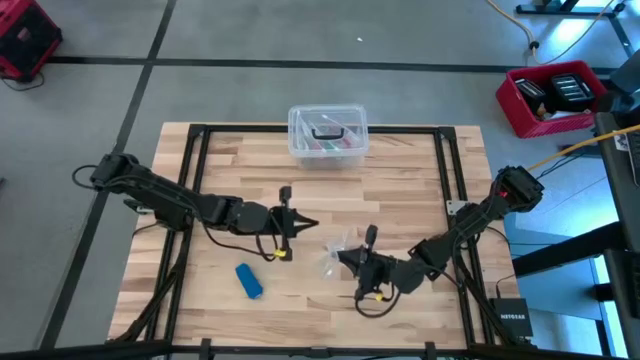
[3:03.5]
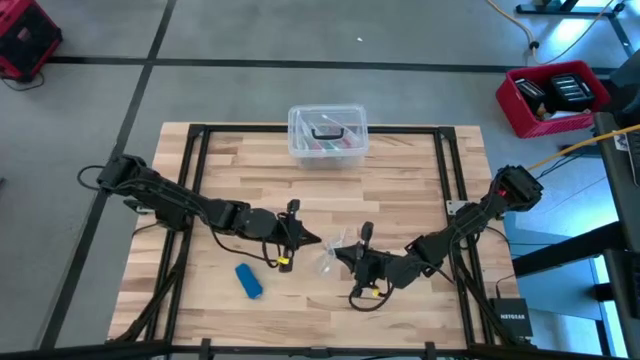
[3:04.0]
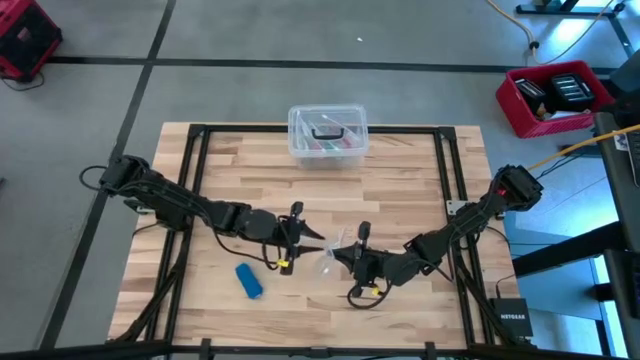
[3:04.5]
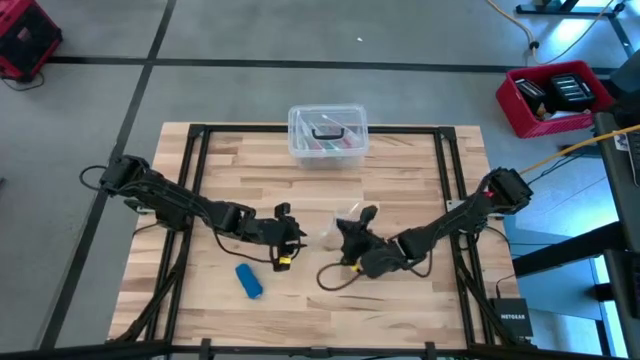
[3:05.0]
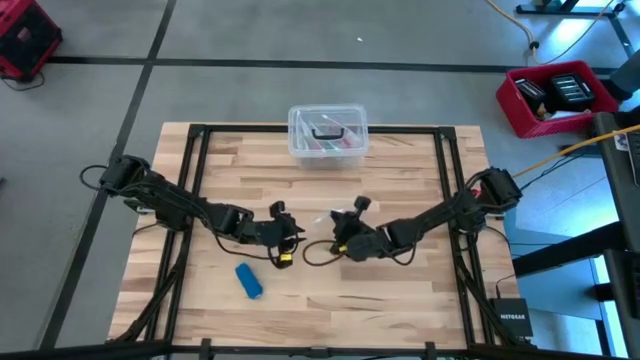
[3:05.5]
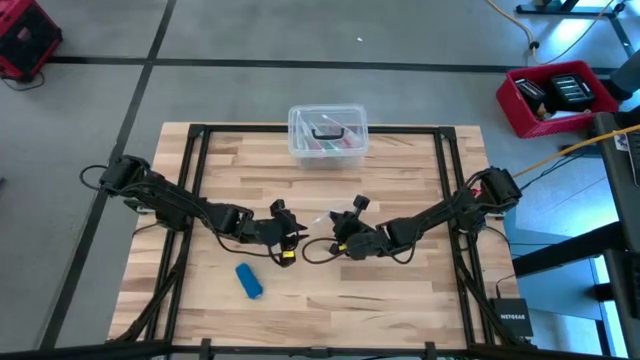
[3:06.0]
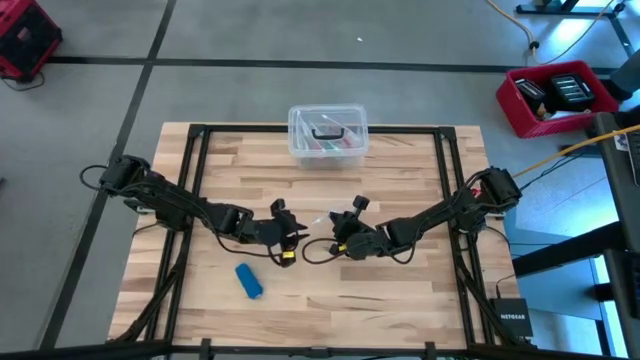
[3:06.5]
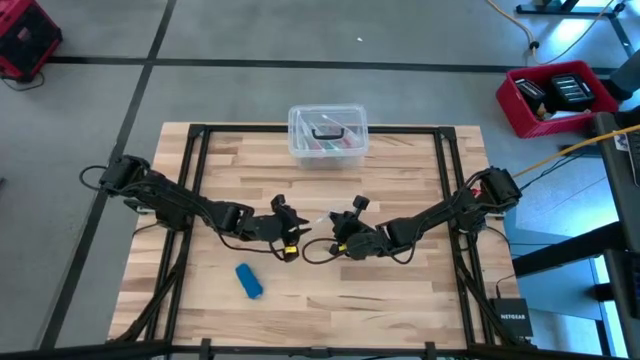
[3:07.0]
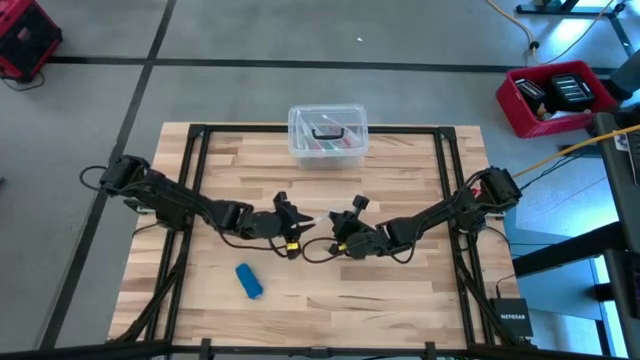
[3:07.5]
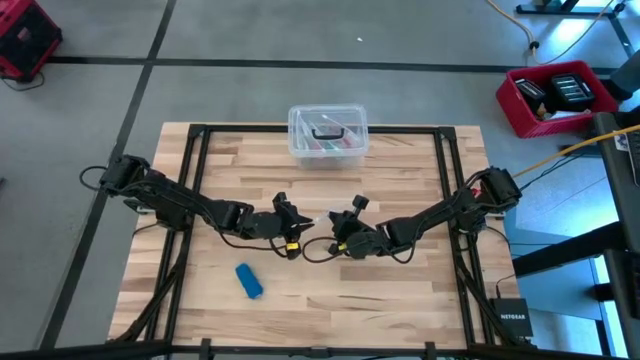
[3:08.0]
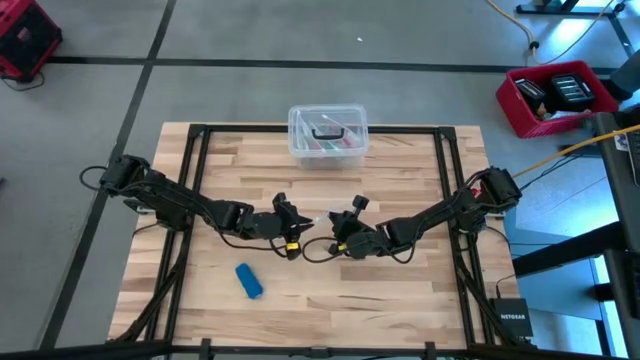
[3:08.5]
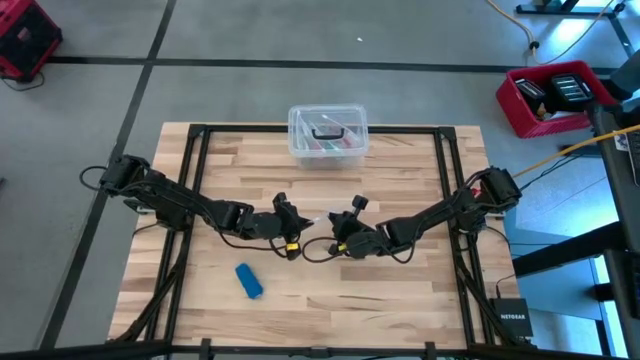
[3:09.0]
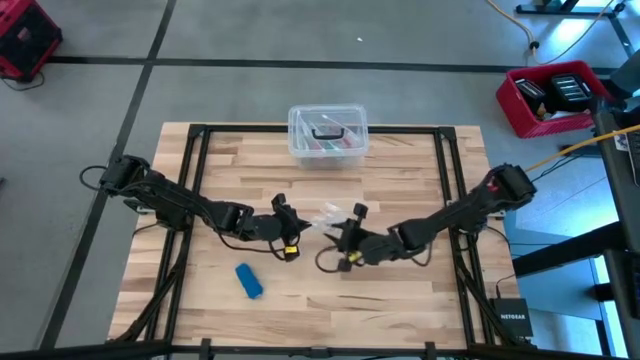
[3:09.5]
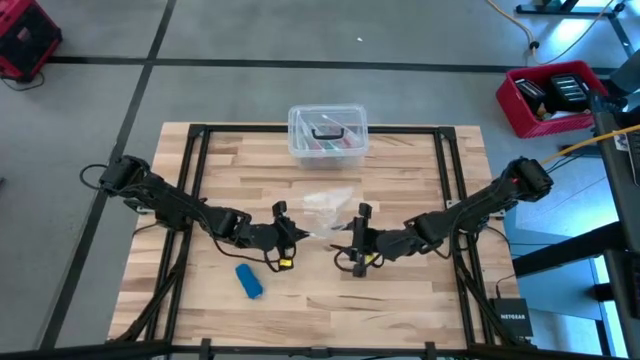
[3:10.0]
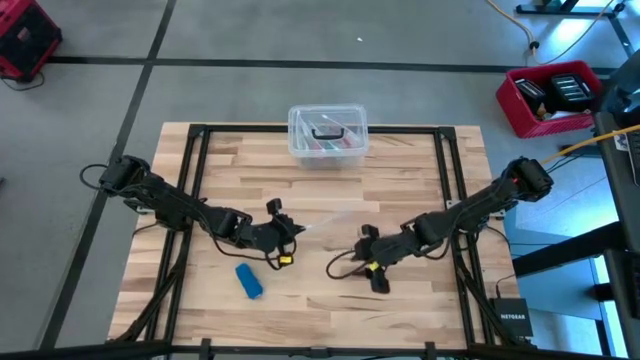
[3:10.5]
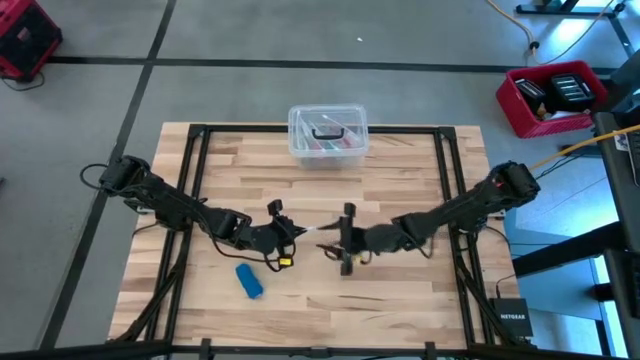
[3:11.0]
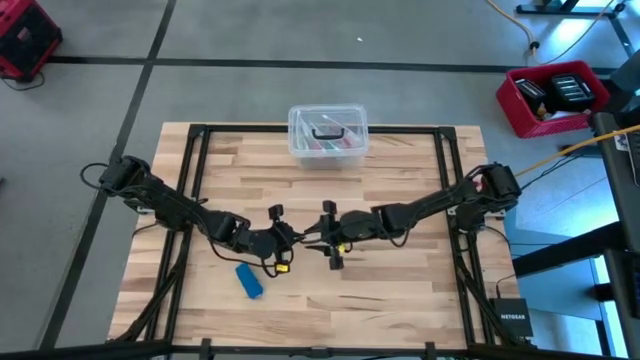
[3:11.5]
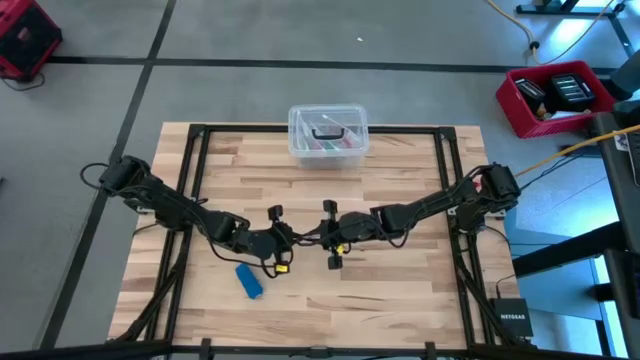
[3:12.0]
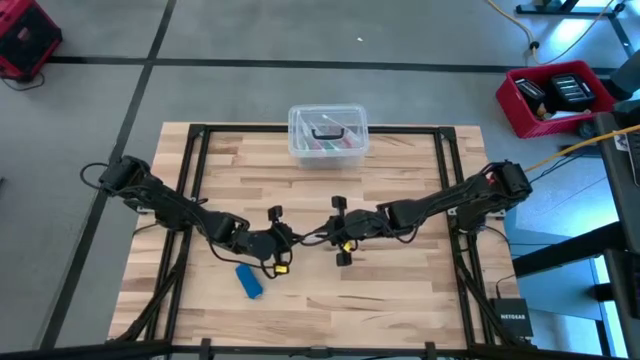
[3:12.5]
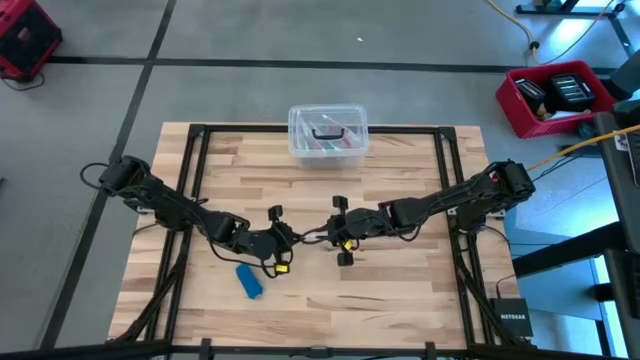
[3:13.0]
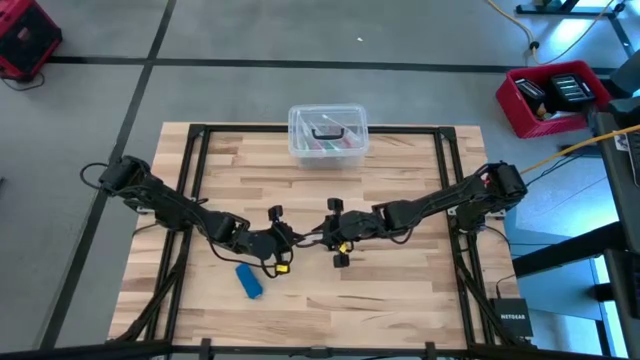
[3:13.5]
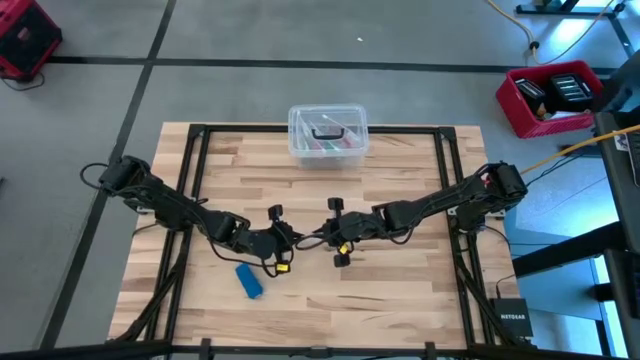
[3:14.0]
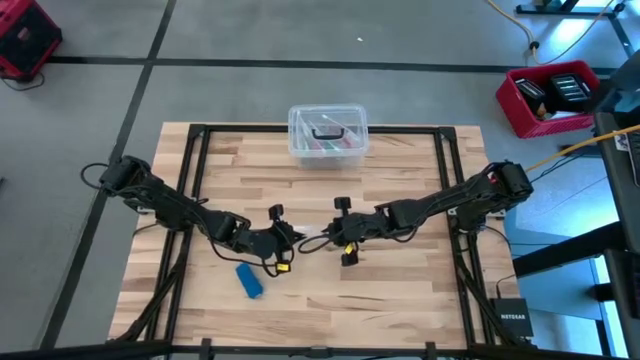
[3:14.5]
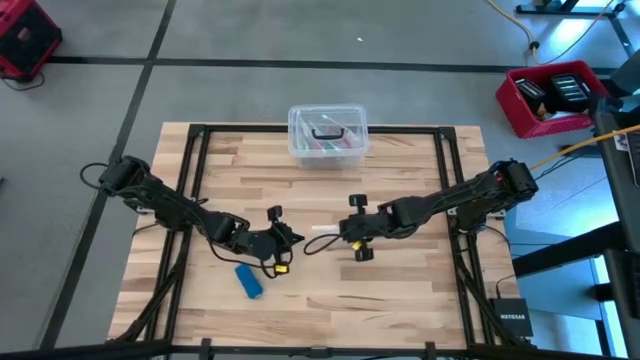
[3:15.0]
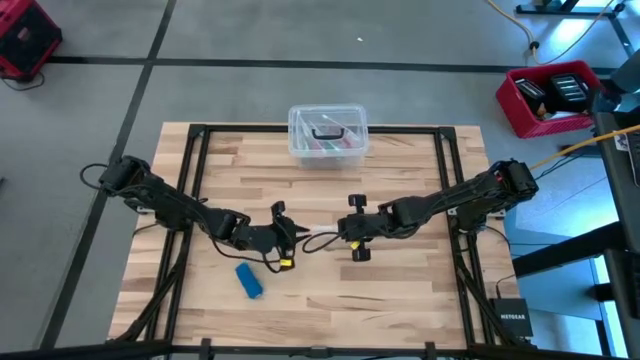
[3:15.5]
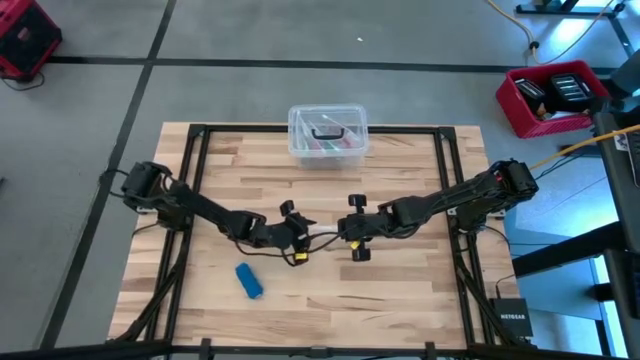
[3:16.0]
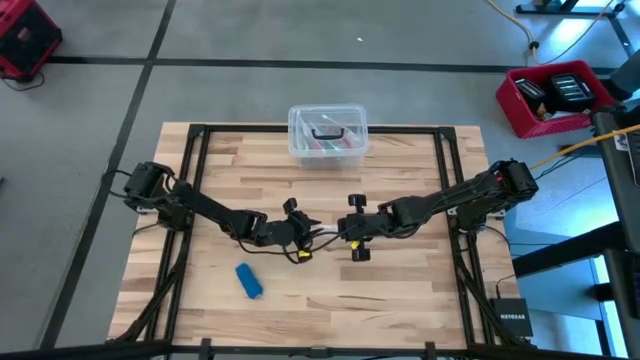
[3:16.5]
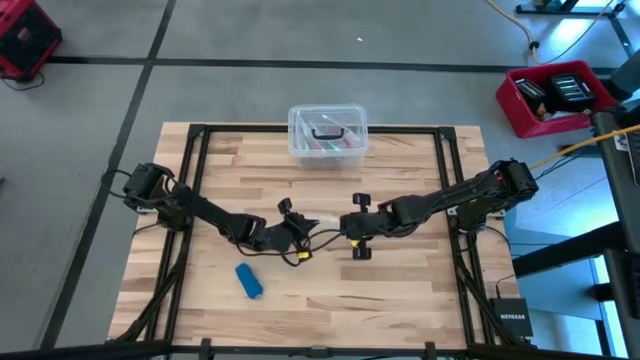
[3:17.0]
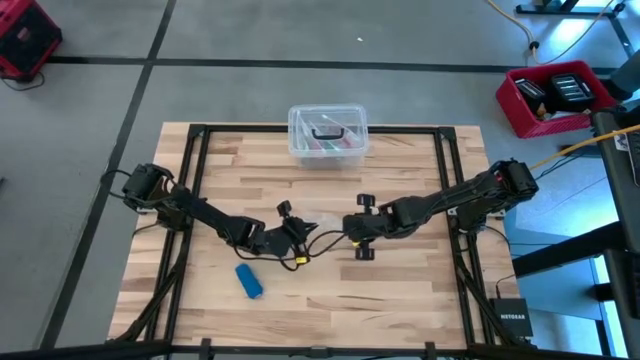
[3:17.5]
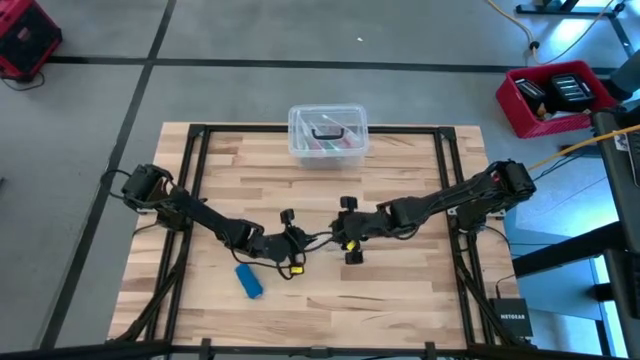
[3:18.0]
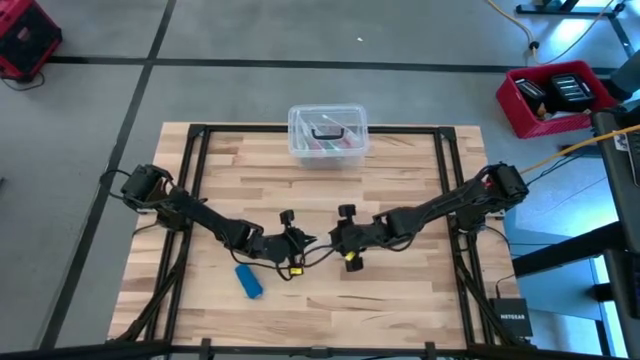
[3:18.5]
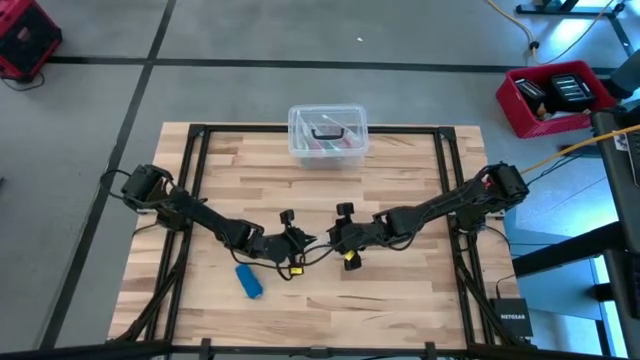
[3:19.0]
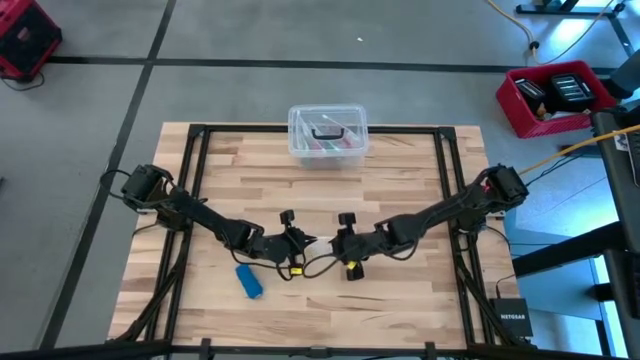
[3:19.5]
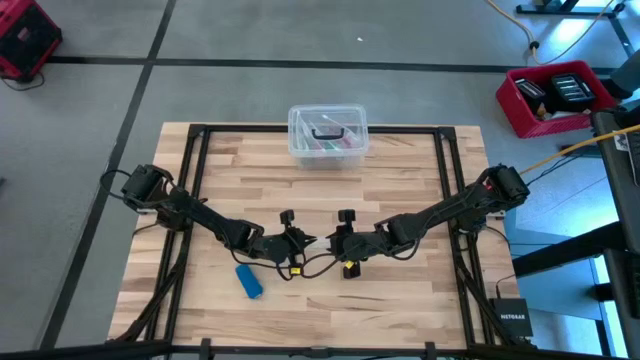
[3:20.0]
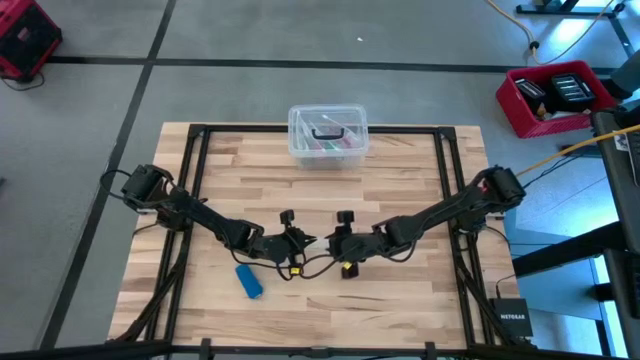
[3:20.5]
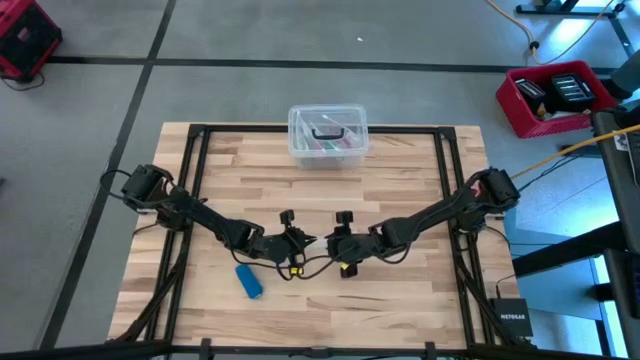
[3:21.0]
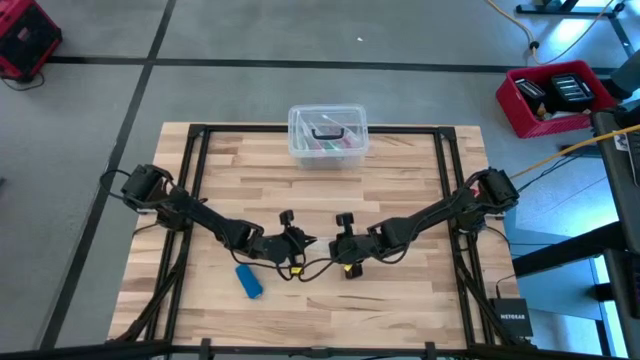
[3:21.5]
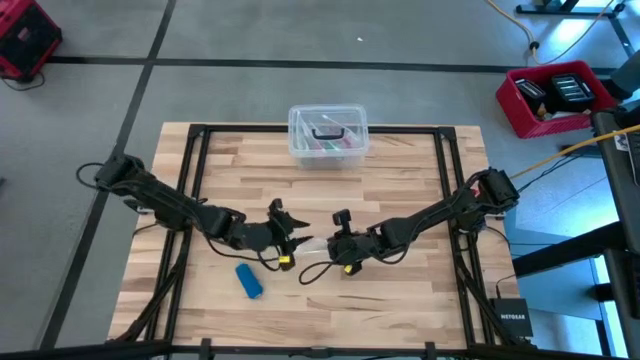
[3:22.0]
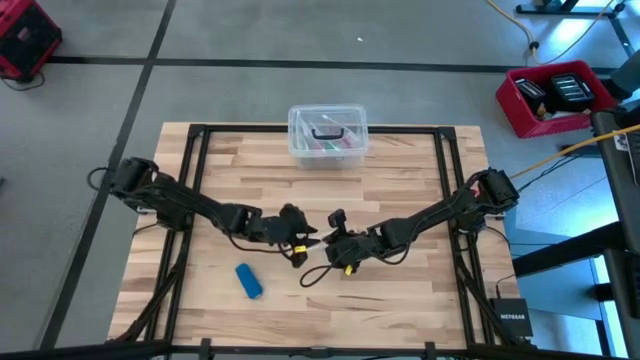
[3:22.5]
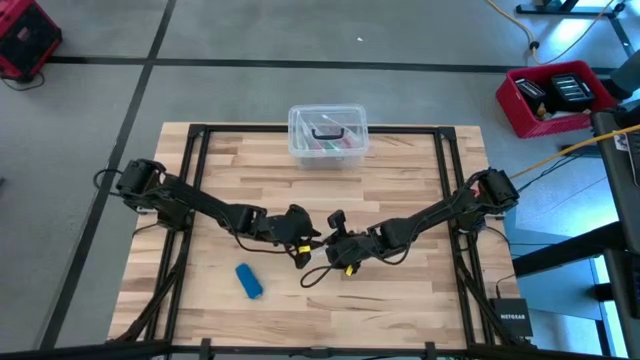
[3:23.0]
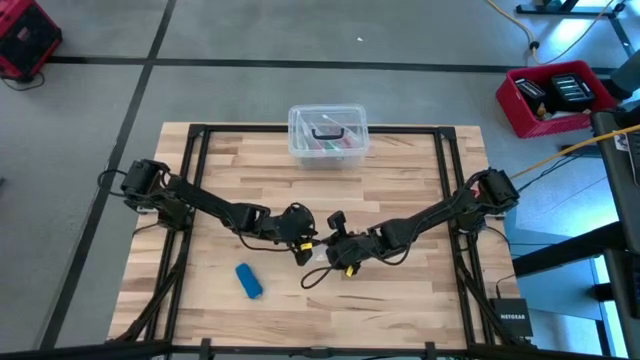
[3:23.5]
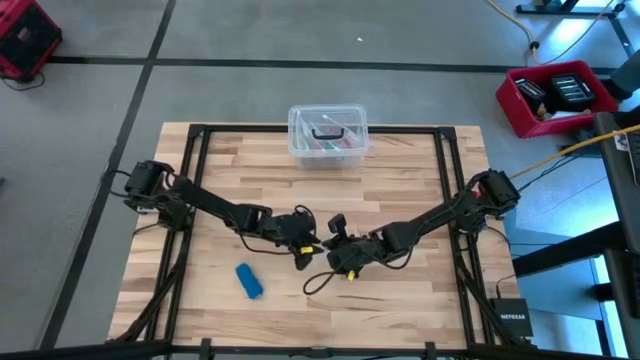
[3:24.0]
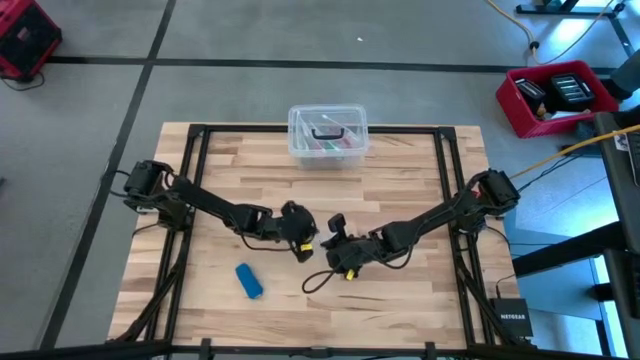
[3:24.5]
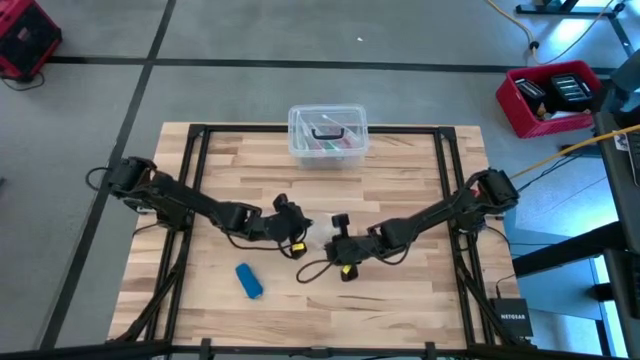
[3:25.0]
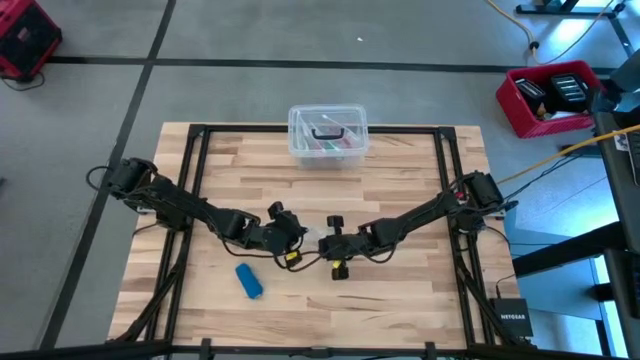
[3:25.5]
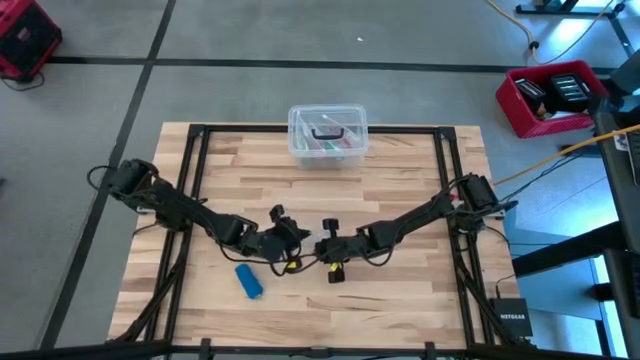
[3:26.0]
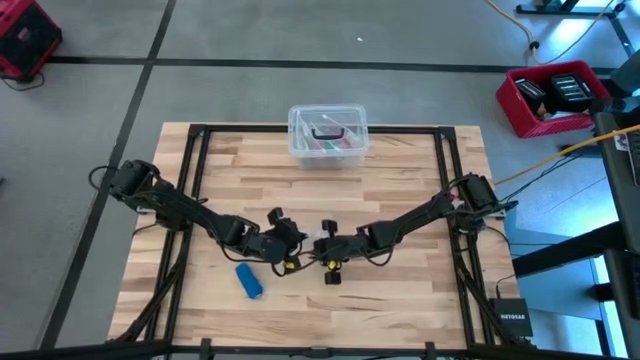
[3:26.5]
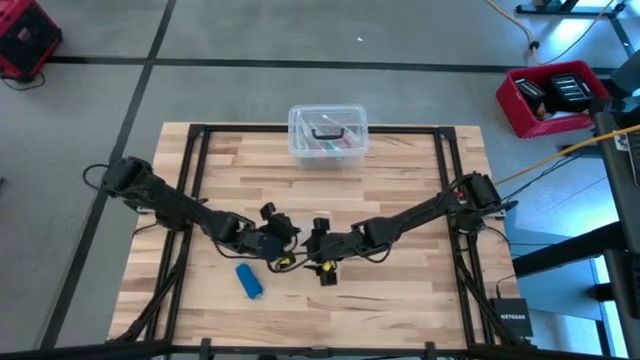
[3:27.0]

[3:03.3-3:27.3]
Task: Roll bandage
Open the transparent zip bag
